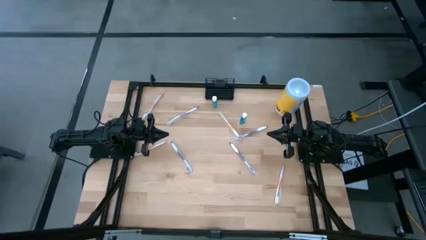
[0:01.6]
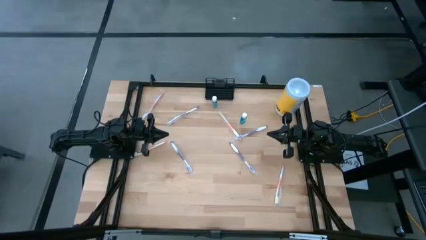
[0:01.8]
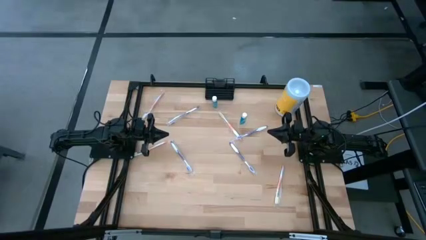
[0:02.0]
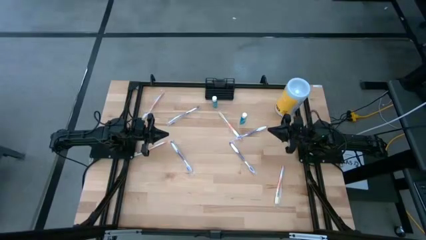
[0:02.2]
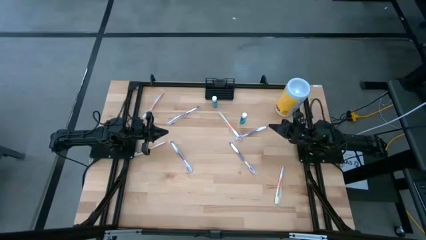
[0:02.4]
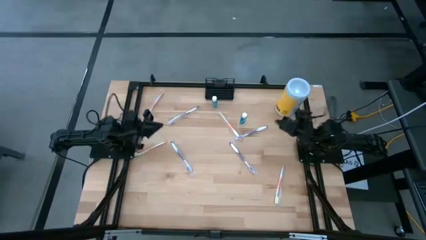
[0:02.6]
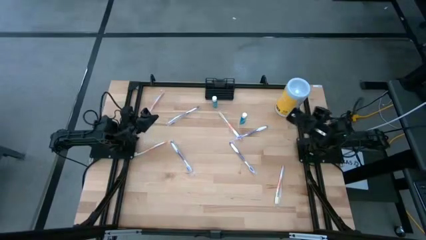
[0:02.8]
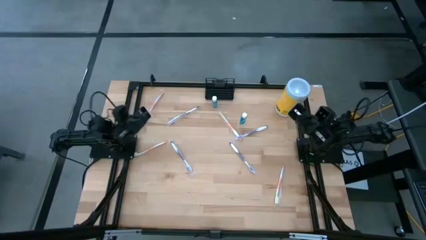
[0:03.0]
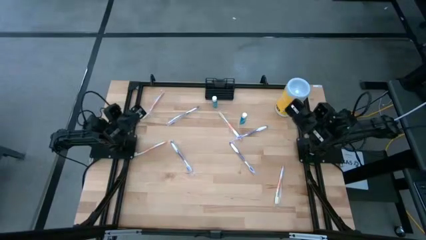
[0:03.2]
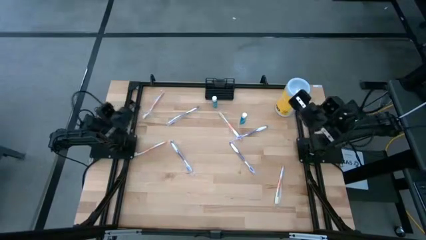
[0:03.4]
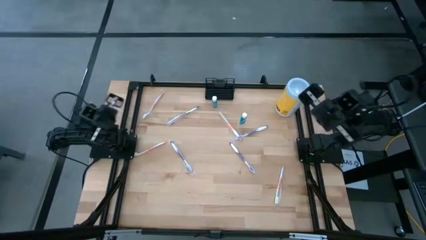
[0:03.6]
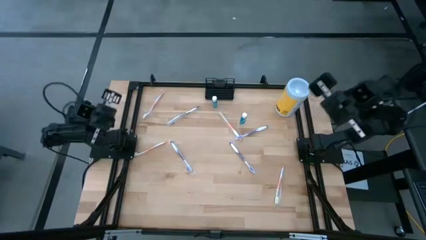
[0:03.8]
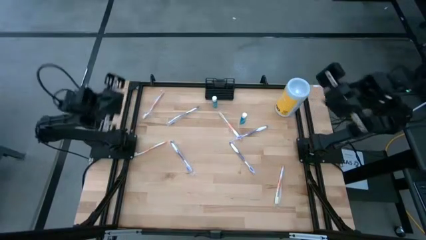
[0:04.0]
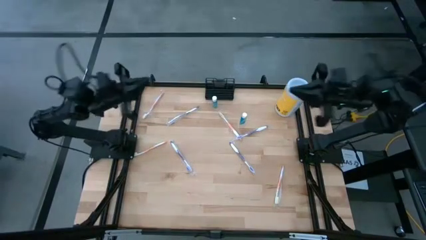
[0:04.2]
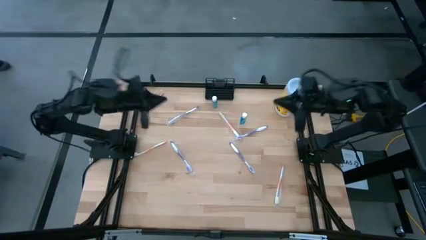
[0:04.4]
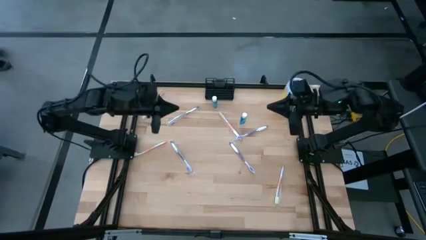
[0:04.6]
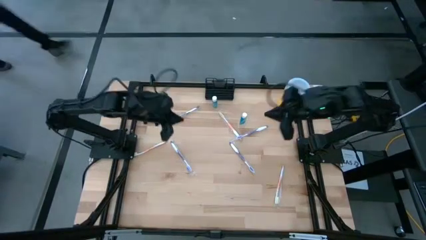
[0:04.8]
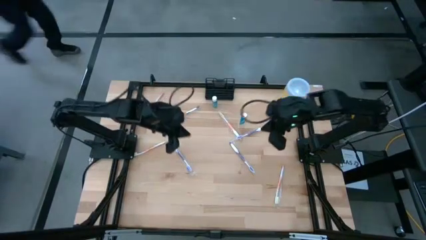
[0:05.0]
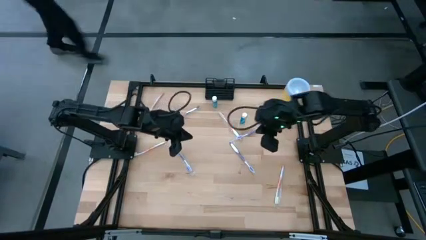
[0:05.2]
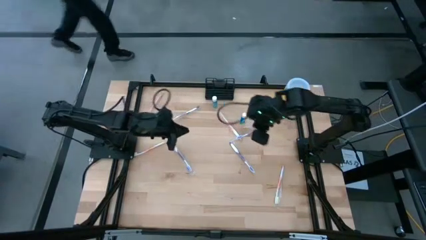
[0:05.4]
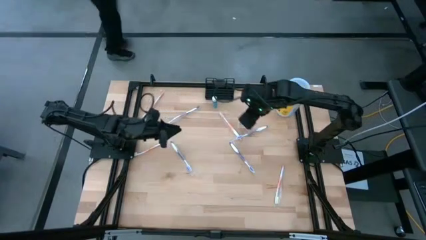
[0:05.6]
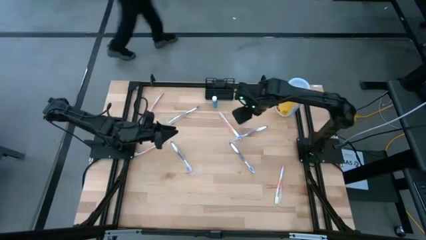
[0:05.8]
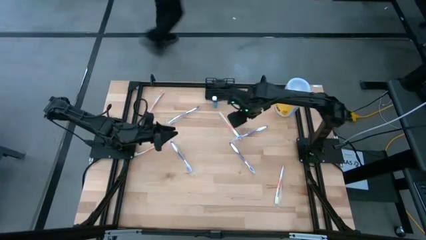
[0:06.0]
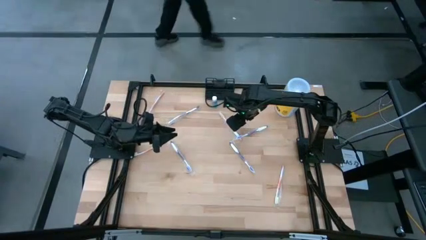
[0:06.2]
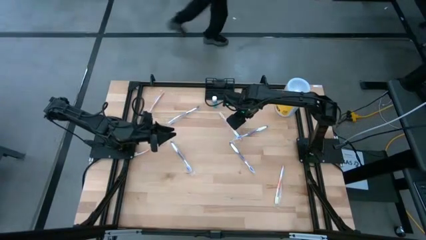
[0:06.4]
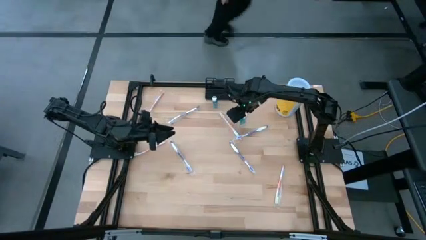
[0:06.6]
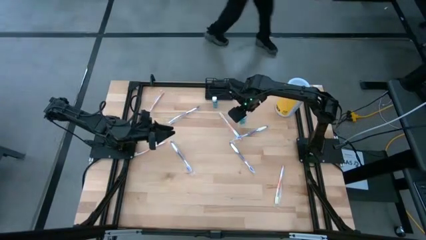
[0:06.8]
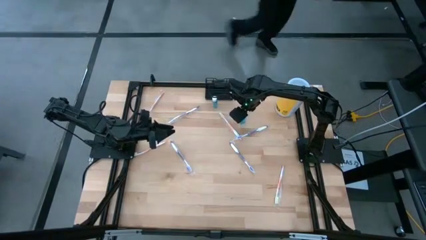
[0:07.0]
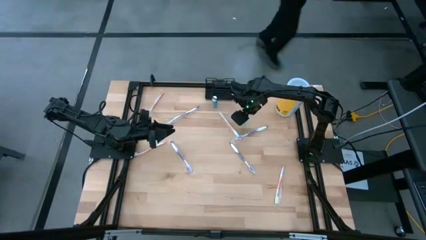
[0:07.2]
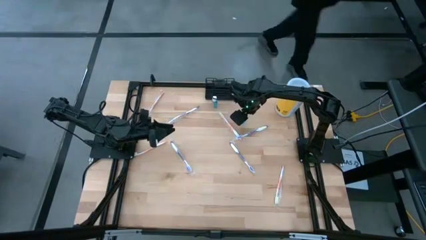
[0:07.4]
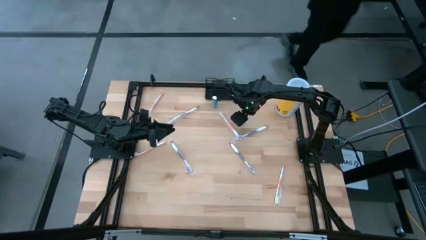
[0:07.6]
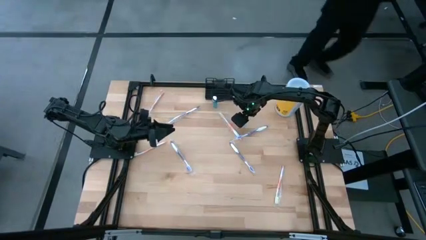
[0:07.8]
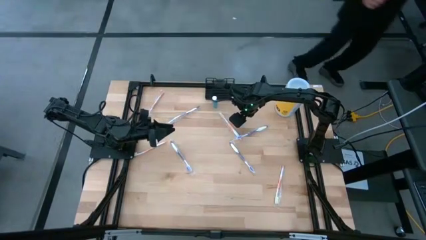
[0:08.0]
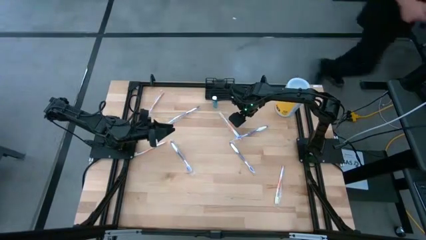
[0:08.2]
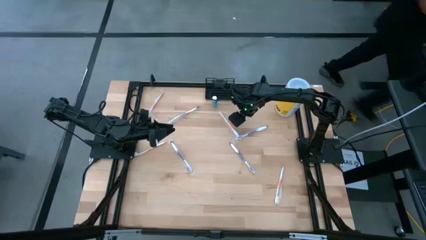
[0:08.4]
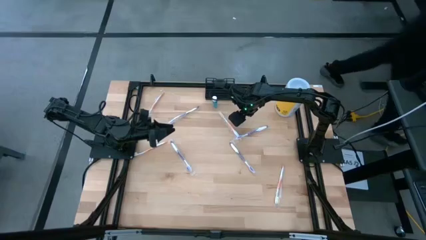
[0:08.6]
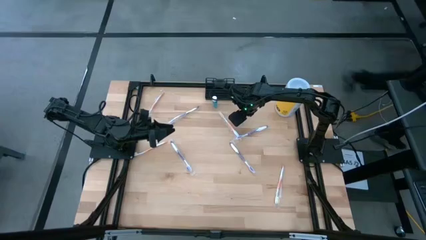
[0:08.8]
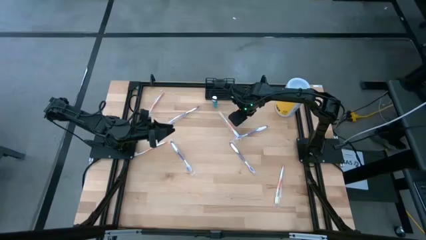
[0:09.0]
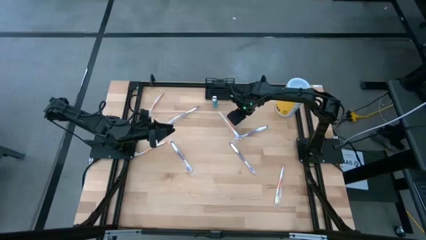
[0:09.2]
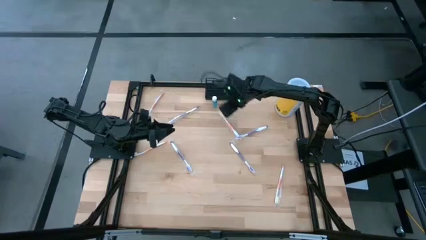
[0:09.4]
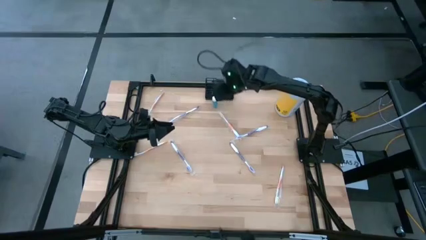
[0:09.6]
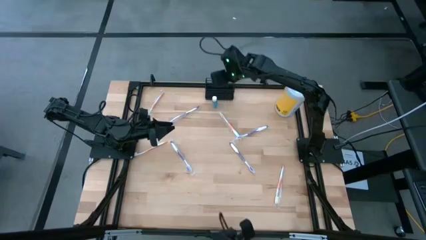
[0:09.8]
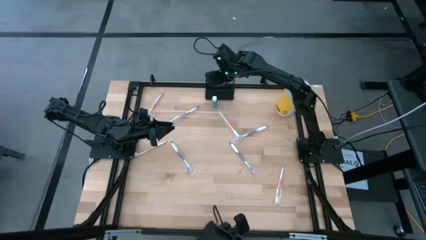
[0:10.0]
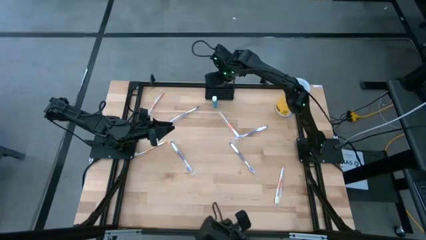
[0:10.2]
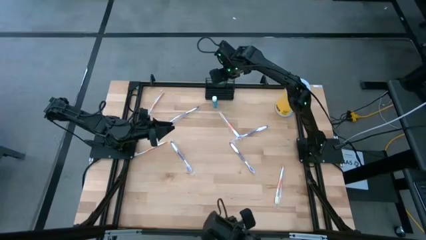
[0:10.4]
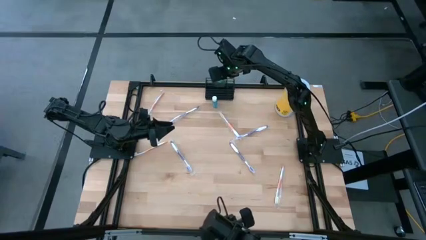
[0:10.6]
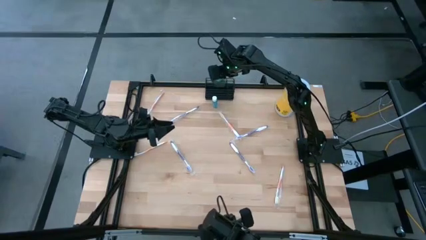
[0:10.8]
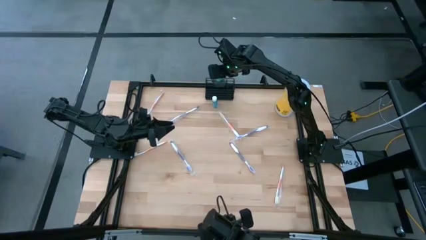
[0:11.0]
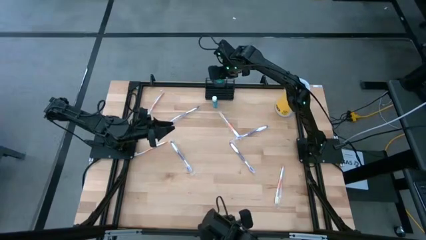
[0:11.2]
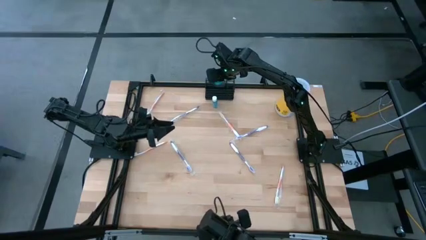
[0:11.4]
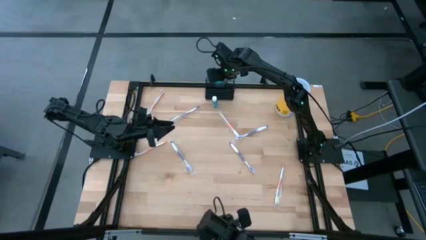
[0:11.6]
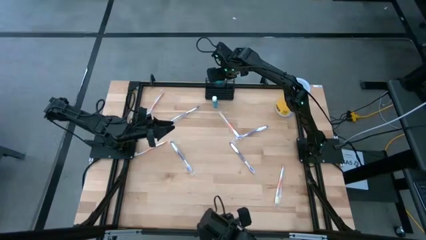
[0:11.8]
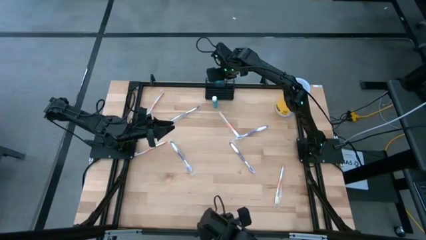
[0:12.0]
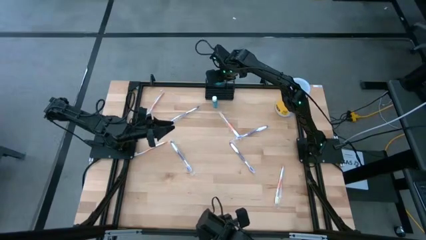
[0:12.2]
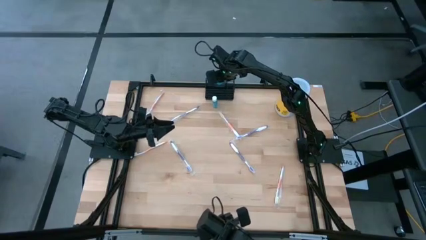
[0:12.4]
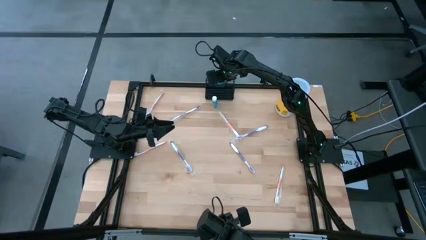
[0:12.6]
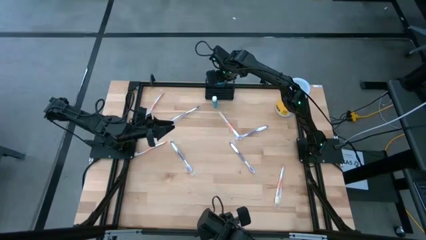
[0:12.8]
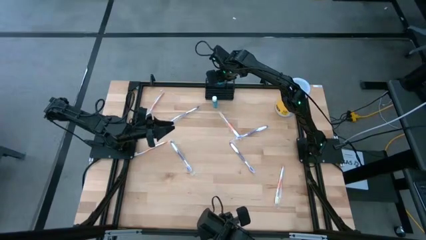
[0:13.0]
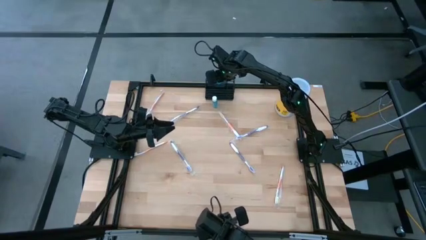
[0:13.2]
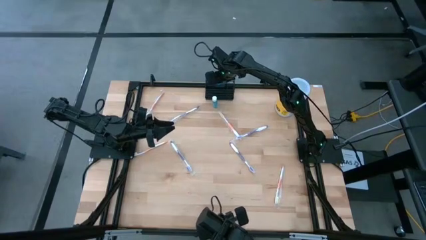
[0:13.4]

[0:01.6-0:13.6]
Task: Pick & Place toothbrushing station
Put the blue mouthwash into the black wire organizer bin

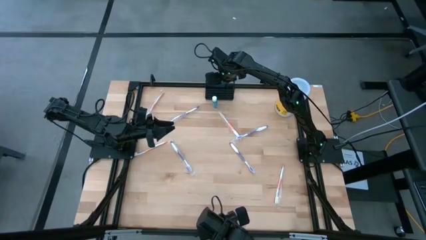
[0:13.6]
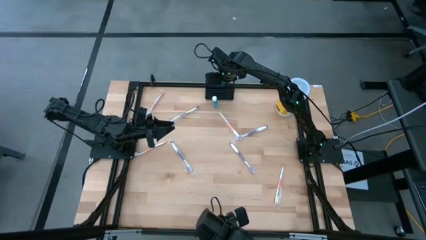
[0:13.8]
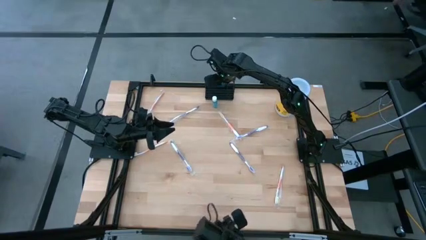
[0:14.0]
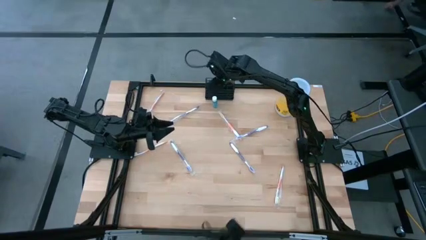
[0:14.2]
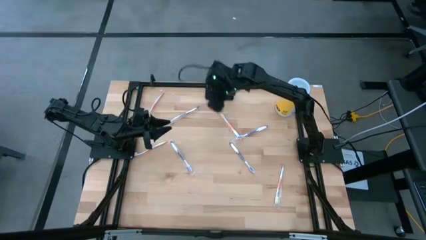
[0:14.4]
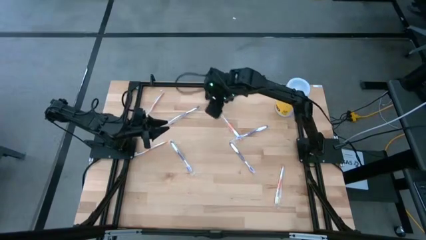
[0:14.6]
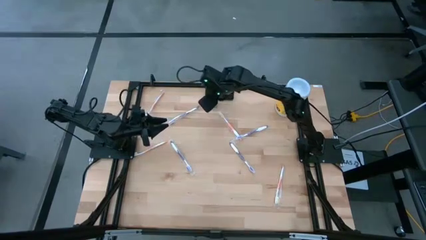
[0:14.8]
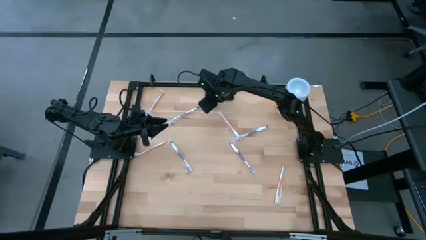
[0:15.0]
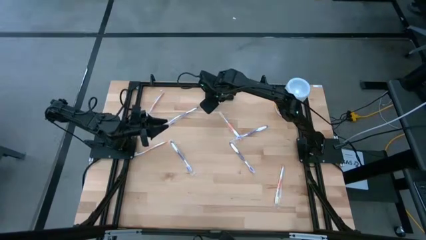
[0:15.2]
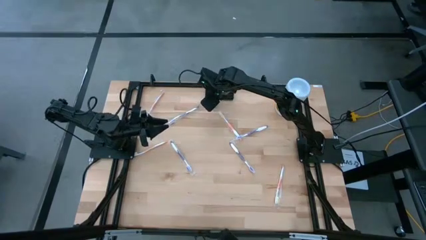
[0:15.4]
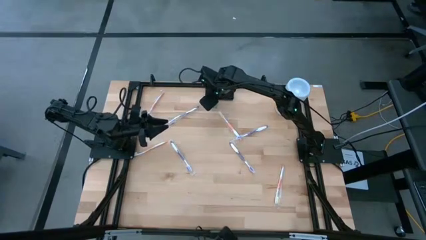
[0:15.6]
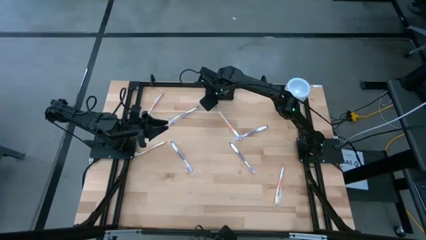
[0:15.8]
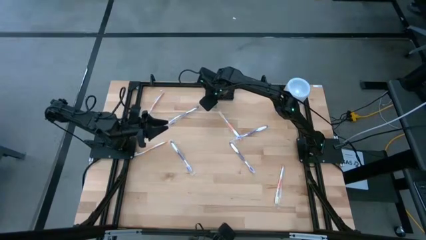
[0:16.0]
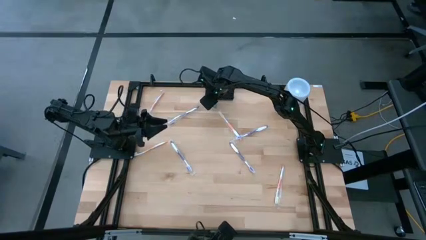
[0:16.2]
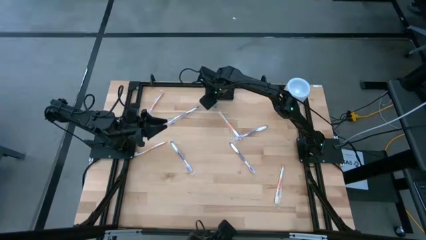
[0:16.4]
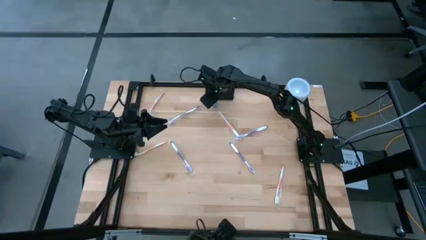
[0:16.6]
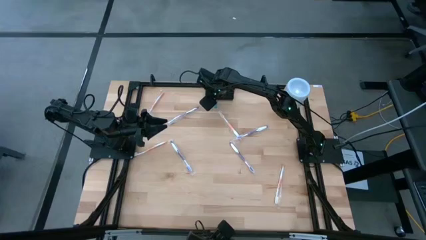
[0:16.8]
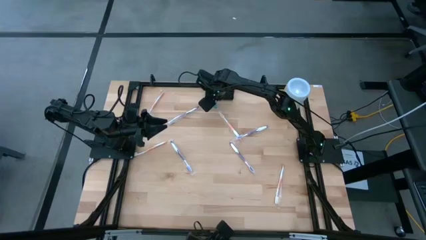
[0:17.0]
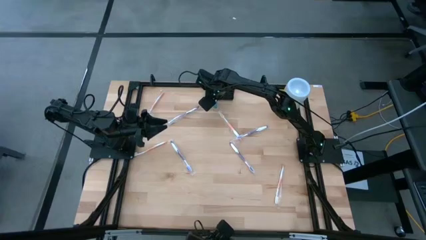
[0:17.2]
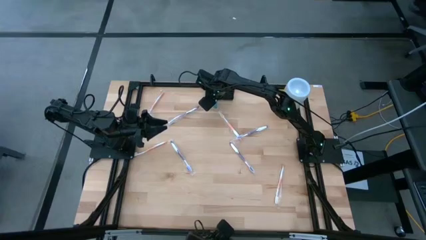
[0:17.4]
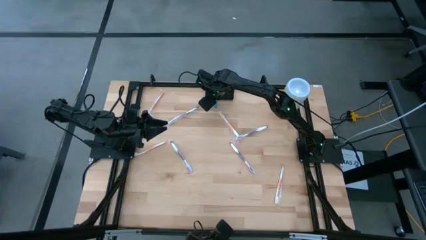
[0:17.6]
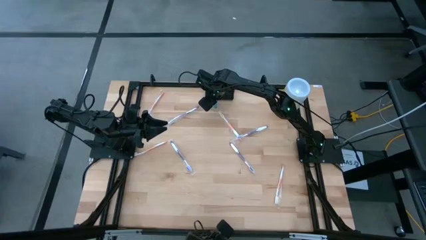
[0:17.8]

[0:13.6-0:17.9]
Put the mouthwash into the black wire organizer bin
